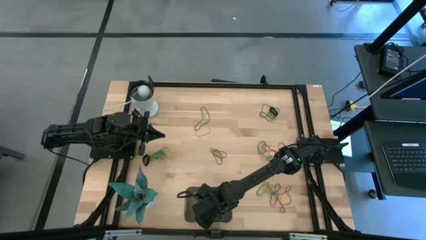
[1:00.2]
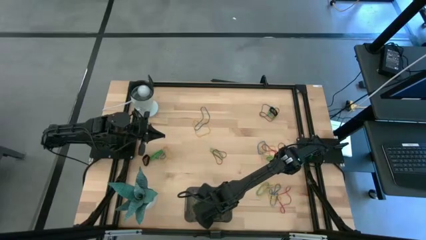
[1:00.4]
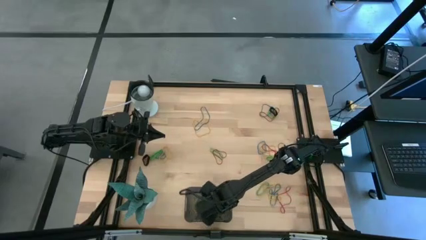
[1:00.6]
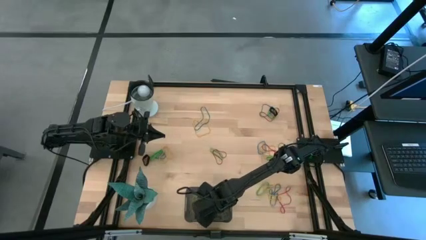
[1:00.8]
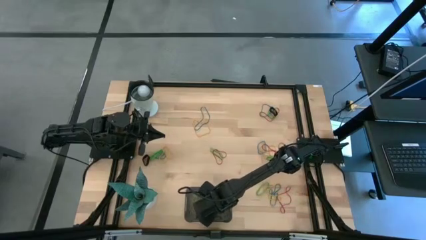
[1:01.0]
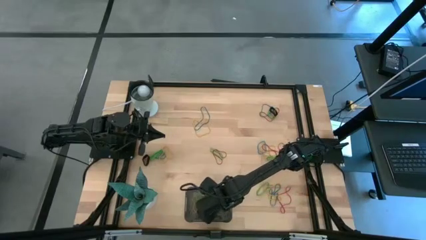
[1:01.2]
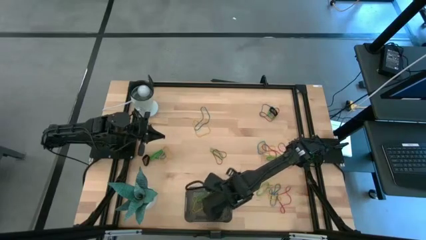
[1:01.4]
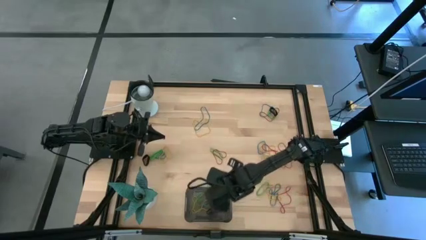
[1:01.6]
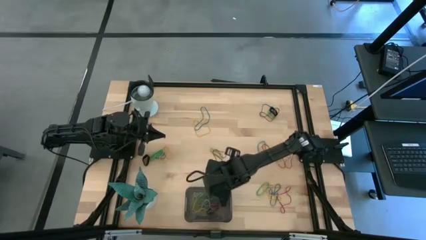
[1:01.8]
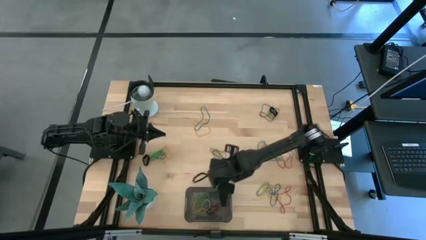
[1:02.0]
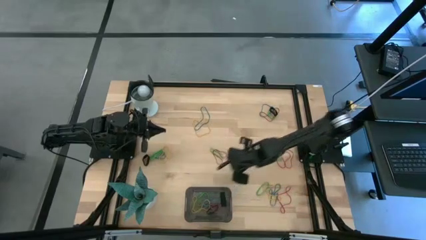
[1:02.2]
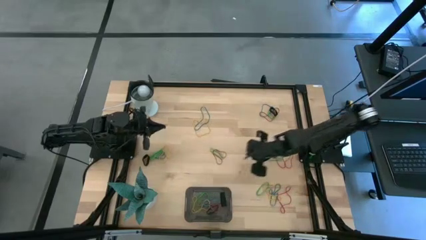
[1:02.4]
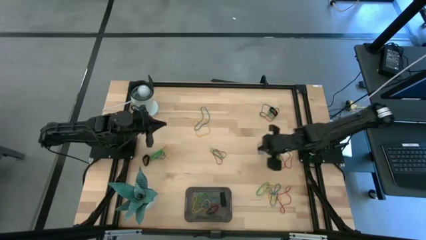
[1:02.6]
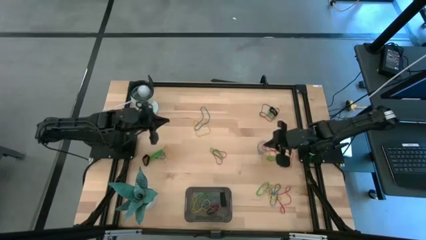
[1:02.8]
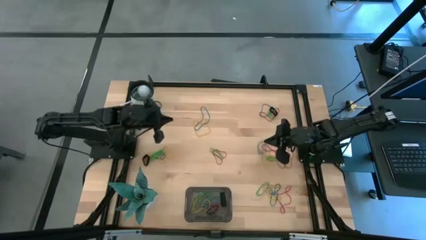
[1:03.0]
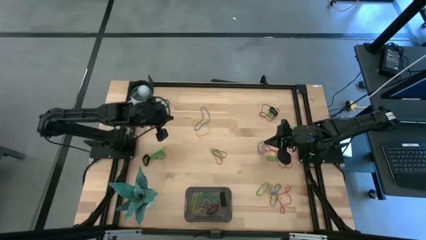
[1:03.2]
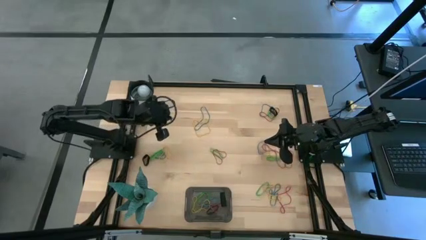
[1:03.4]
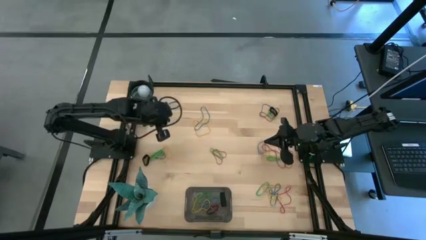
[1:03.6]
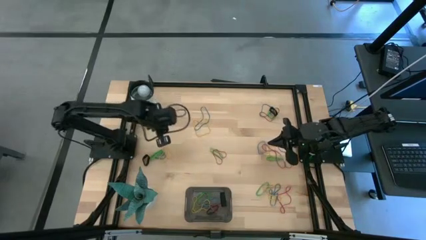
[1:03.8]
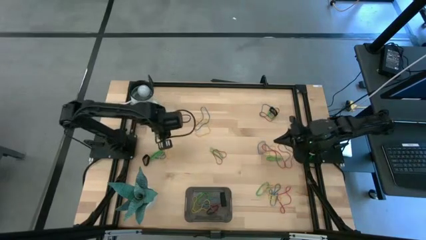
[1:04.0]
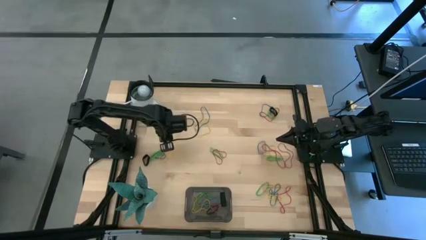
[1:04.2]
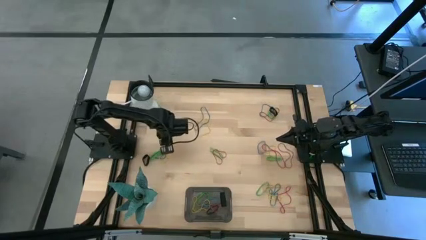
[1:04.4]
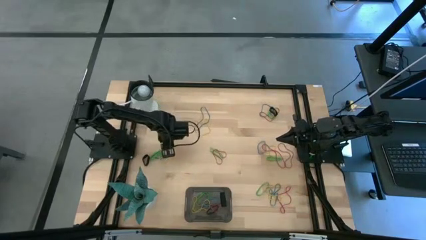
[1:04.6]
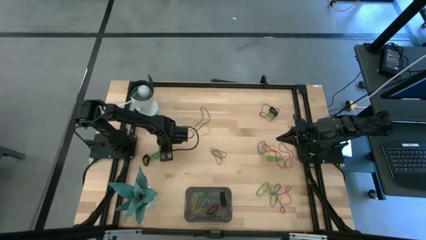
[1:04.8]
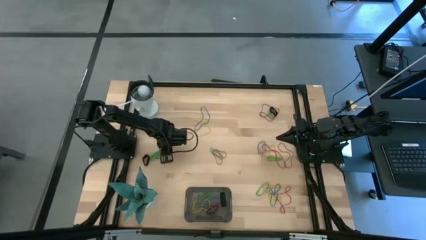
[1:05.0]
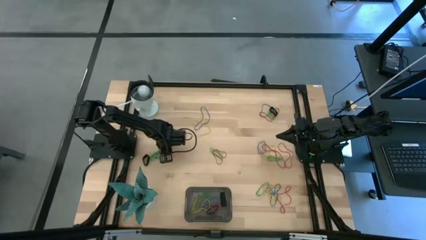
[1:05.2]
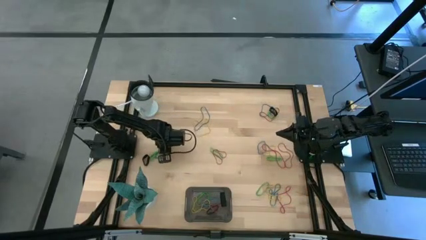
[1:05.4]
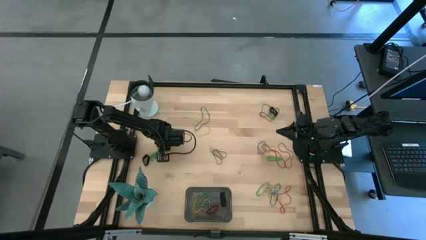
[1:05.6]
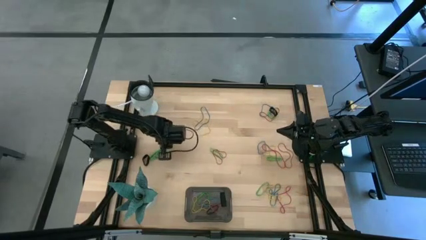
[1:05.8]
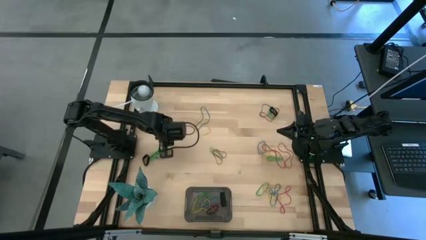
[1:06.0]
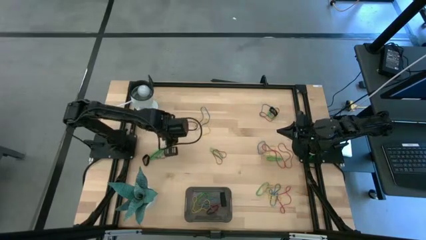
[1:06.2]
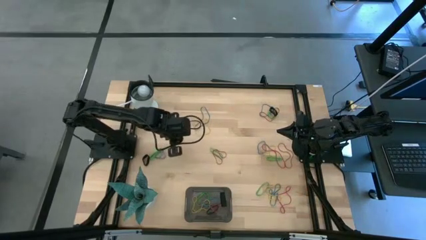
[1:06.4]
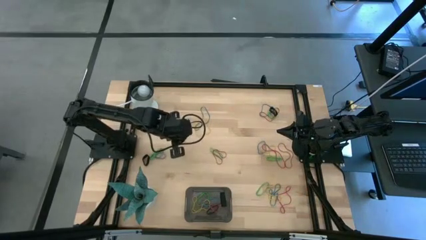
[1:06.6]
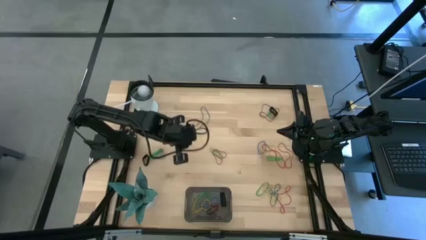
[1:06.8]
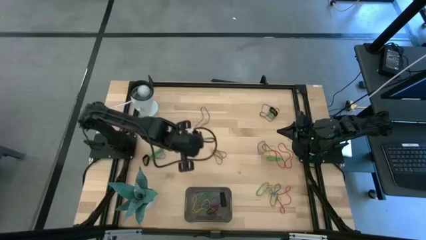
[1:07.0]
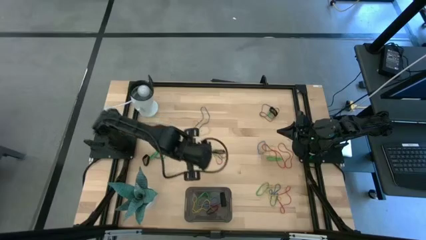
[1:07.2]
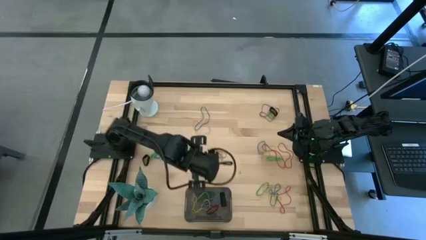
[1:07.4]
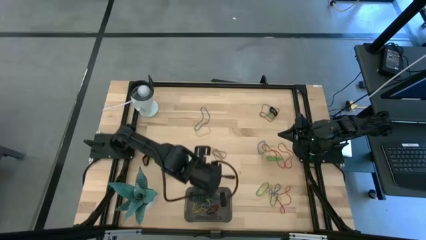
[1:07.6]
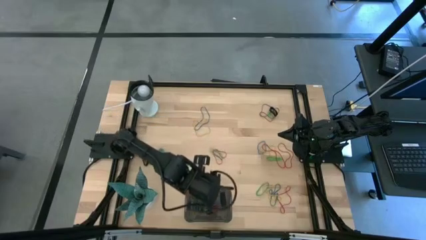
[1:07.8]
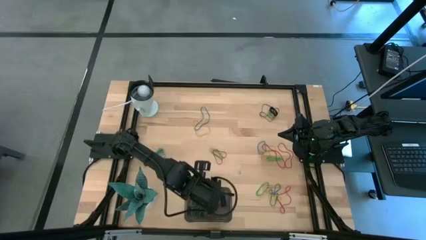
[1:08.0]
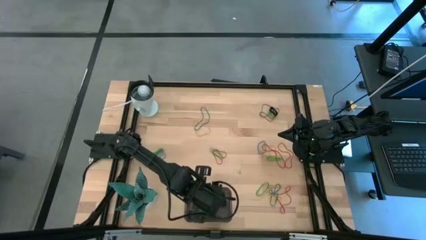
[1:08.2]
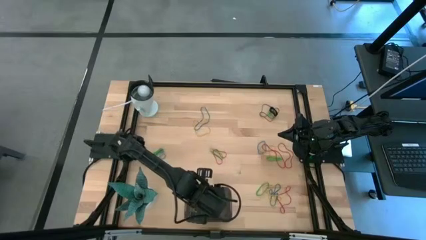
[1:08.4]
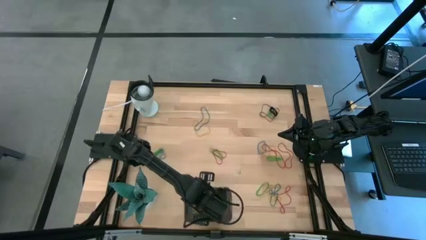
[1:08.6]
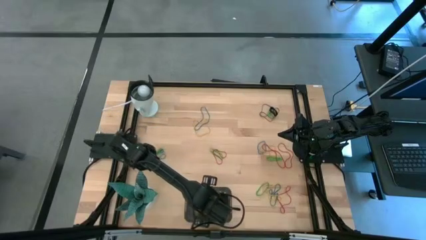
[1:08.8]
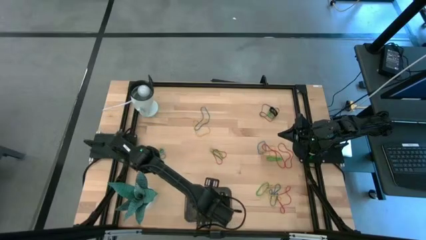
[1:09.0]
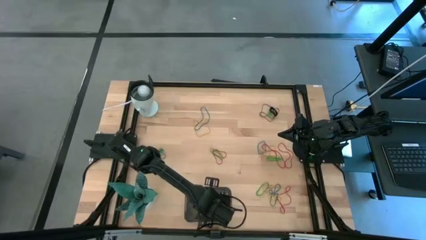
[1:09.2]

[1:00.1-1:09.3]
Task: Pick and place rubber bands into bin
Put the yellow rubber band into the black bin

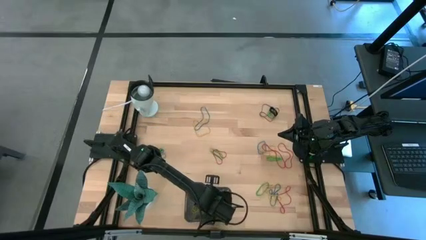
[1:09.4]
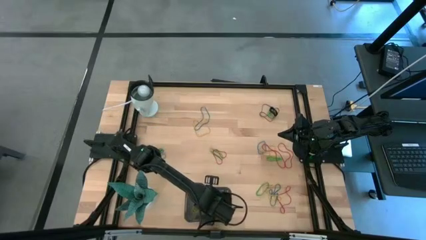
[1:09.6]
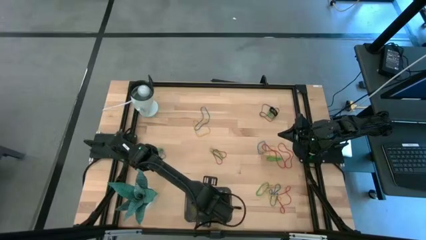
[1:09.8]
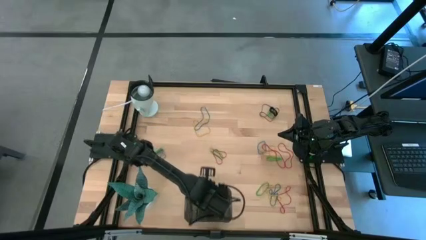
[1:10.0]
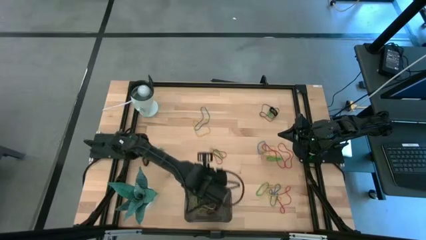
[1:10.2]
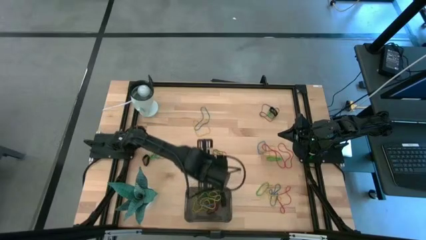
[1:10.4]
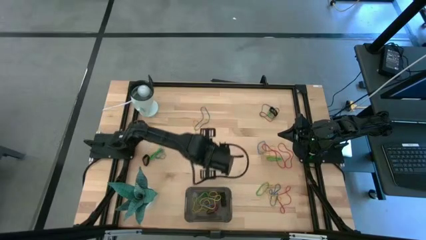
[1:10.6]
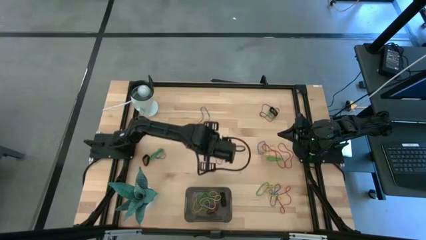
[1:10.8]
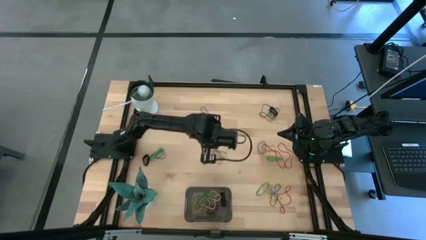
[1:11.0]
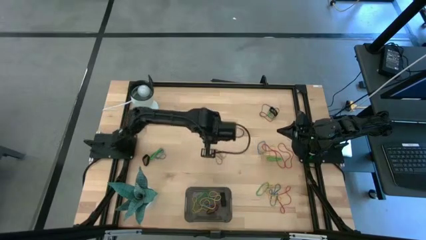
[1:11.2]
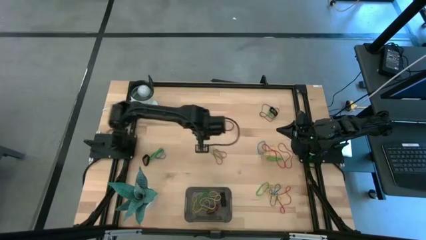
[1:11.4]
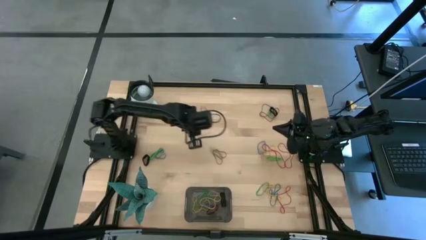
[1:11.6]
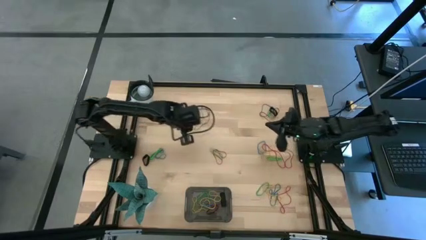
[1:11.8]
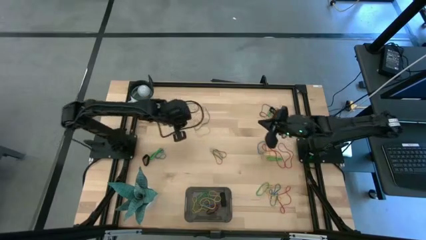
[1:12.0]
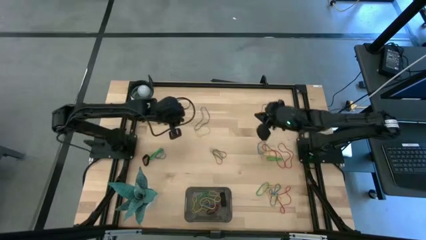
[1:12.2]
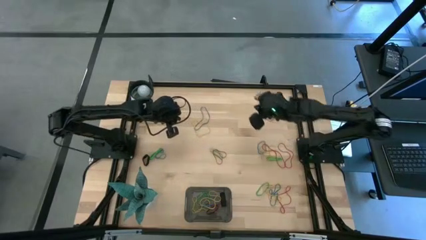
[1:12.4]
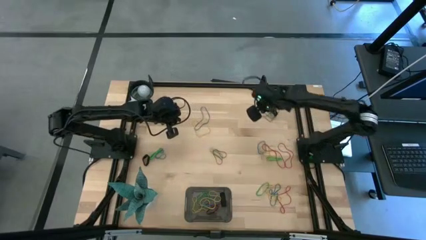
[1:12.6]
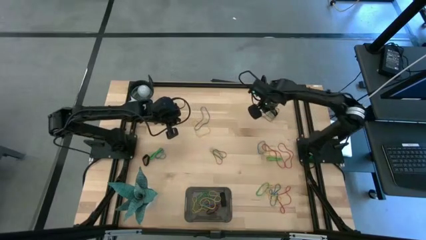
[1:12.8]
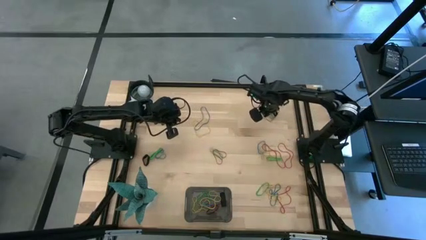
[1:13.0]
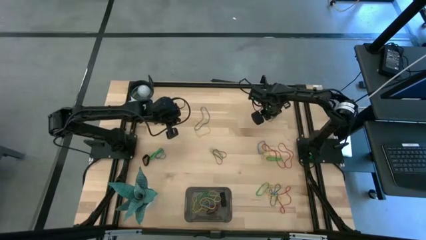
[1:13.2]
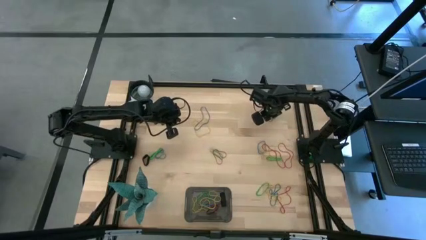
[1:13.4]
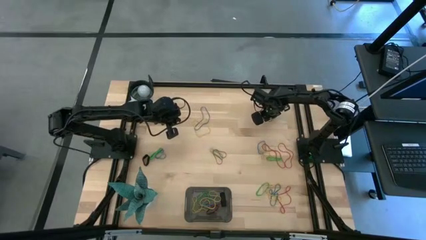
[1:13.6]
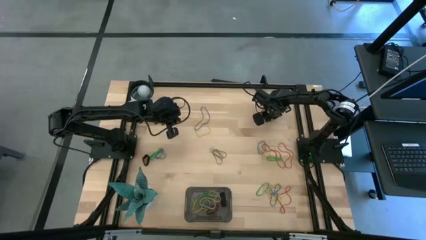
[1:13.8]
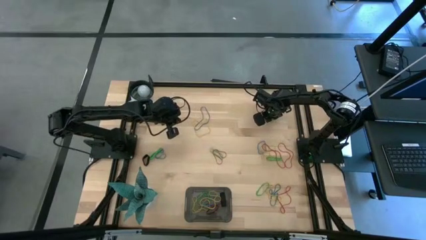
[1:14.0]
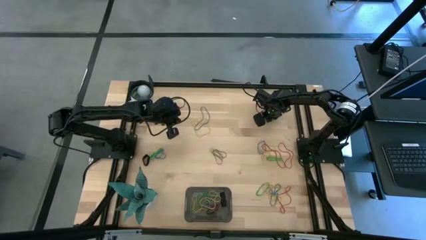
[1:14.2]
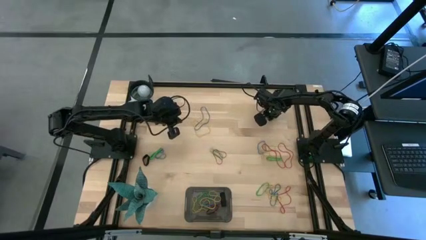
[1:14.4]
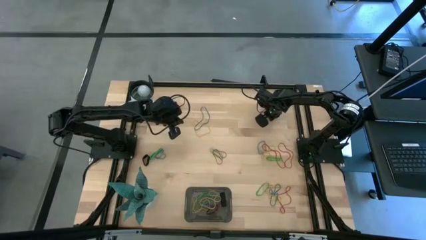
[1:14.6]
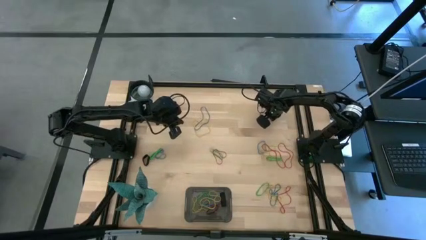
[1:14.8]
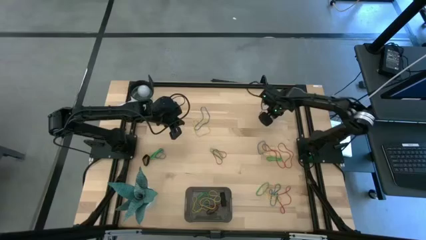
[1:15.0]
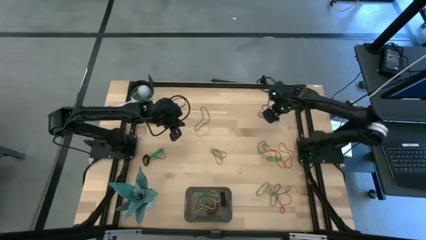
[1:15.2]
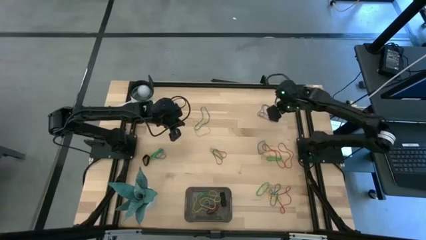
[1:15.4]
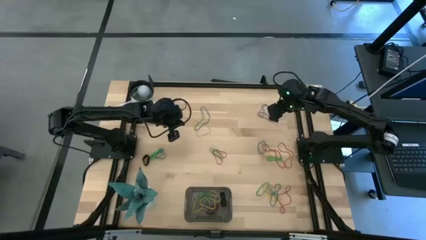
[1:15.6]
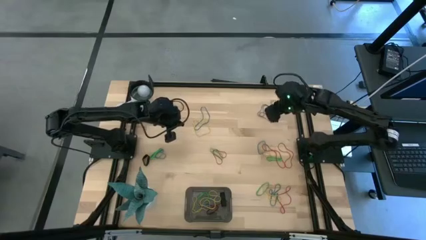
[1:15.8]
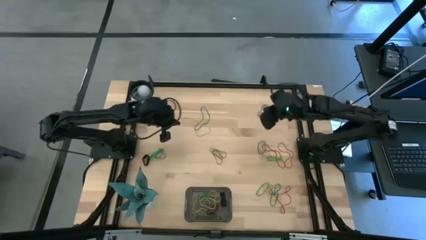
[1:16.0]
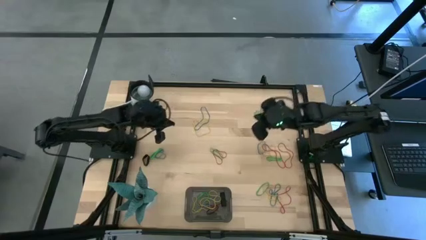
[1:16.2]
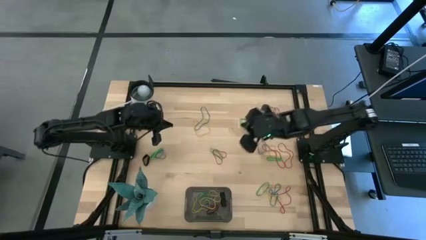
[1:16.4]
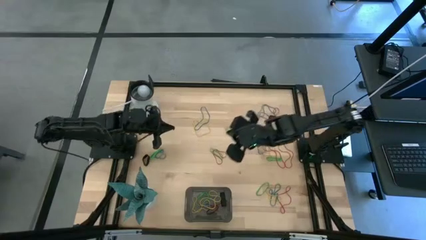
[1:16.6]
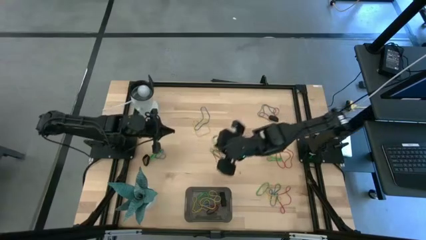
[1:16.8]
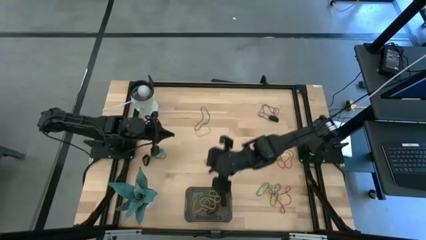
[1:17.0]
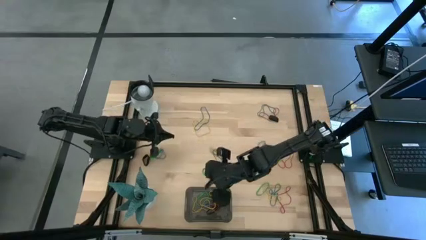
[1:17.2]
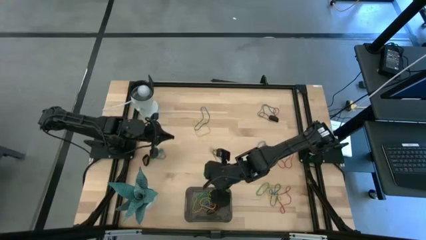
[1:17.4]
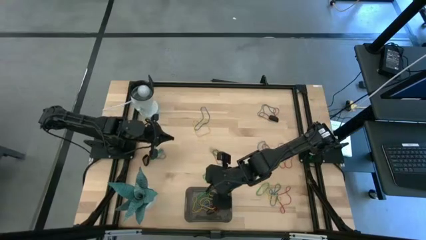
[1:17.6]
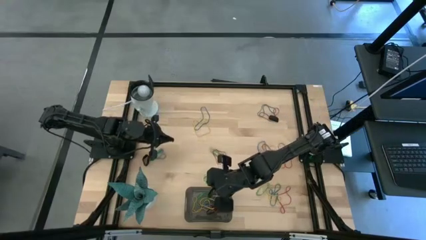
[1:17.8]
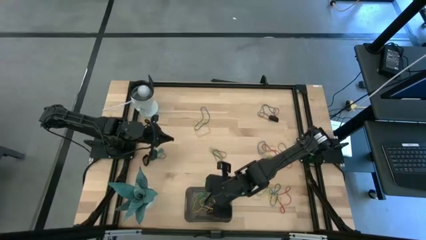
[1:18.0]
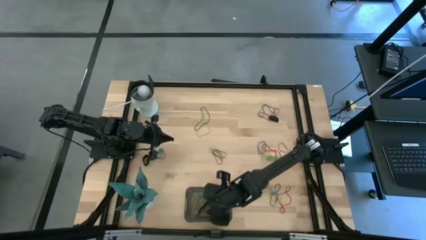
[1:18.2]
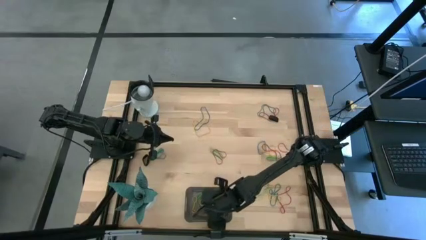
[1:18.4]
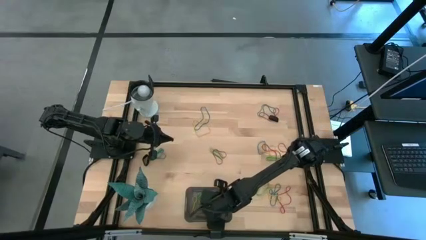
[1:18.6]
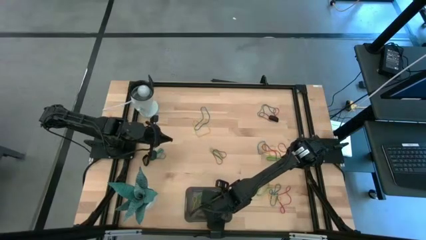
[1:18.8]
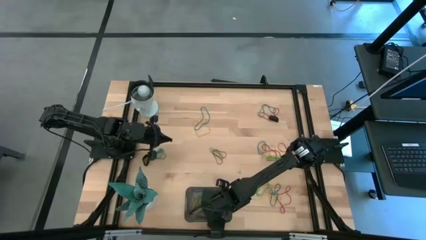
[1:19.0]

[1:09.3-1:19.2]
Put the green rubber band into the black bin
